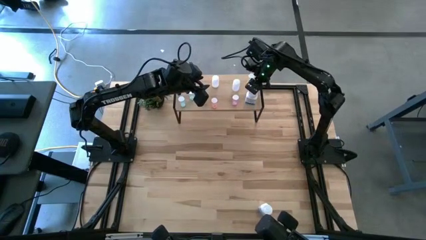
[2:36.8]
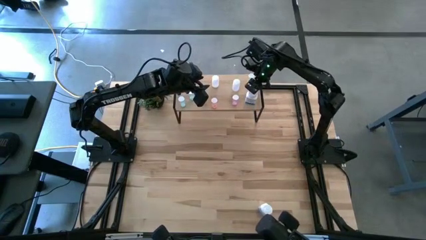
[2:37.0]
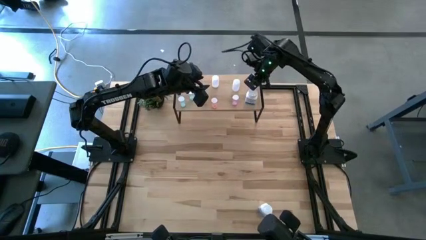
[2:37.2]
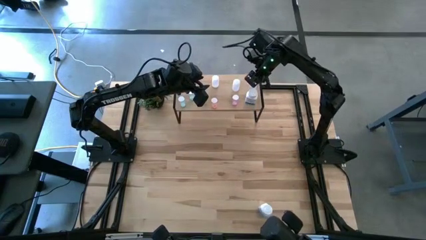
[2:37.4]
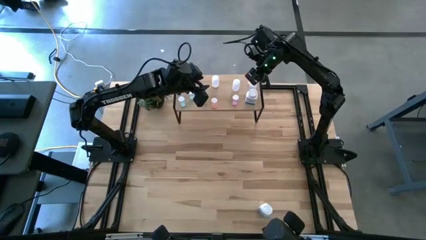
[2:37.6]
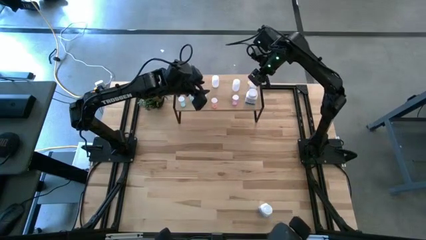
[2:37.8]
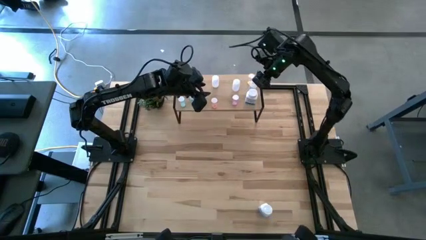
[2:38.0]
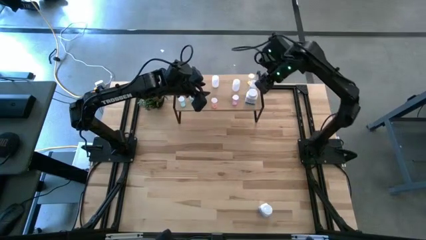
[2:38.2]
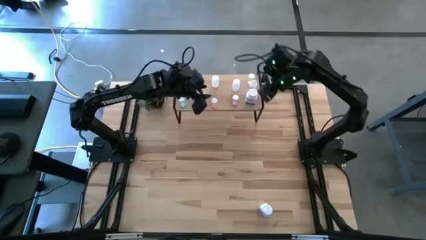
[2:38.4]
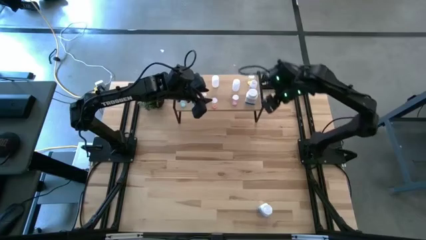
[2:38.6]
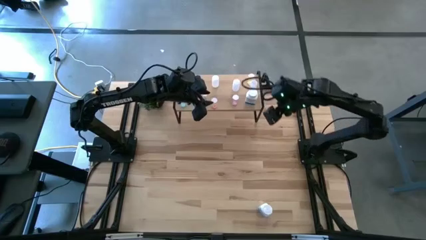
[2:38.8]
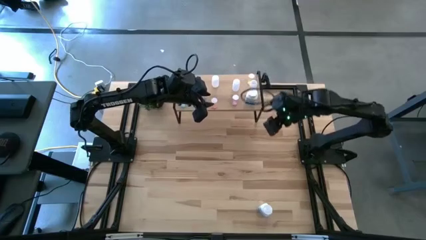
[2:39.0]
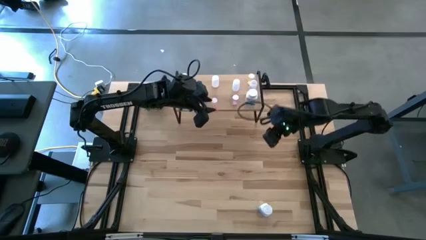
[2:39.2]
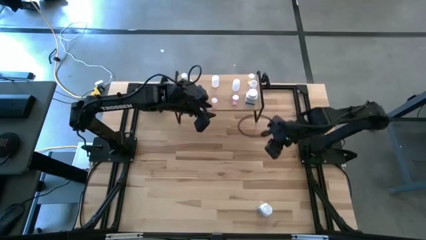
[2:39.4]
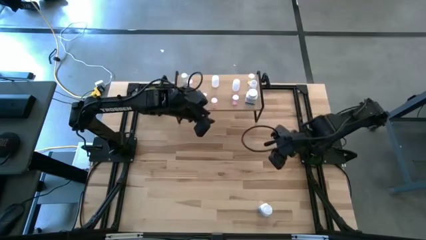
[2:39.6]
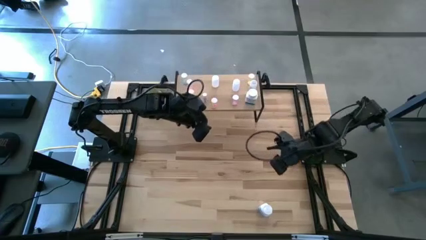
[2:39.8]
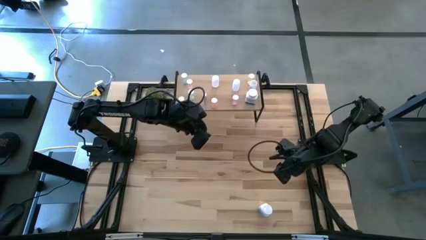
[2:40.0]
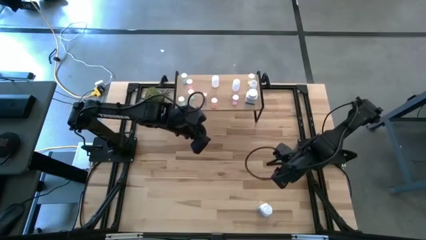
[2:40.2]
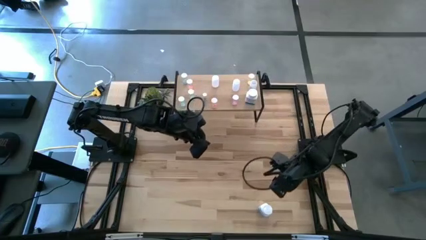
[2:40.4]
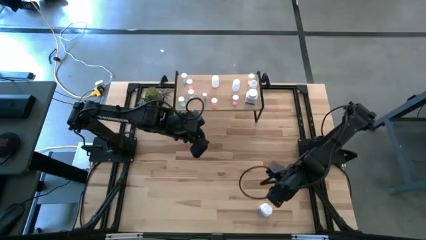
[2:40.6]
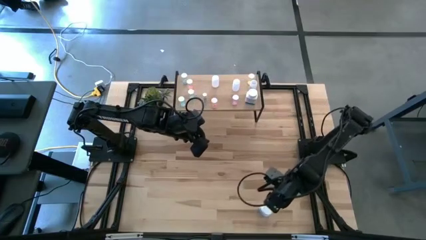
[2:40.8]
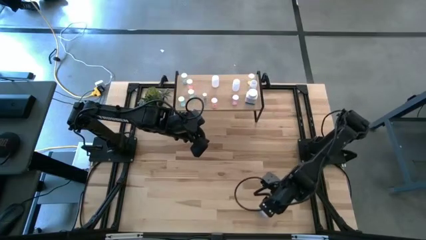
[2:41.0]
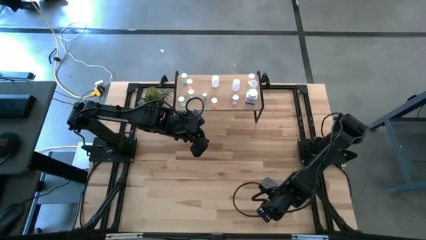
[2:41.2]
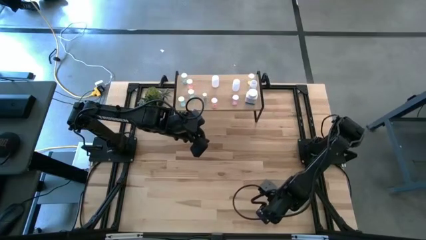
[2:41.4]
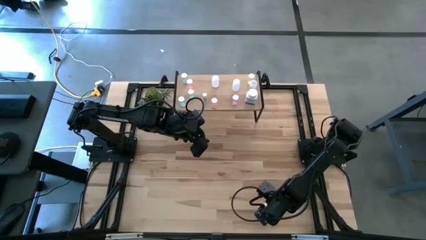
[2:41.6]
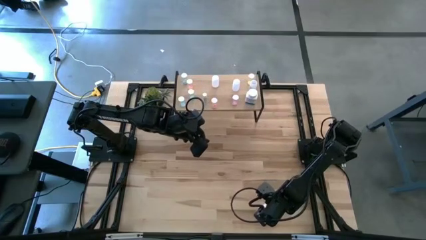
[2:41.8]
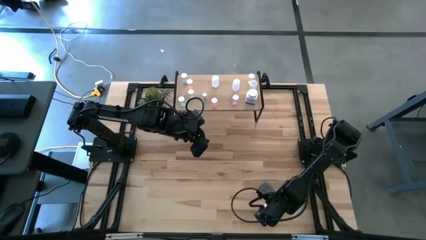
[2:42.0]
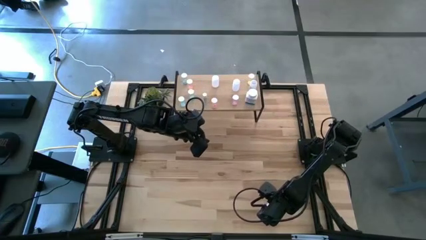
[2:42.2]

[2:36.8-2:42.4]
Task: Pick and place medicine bottles onto shelf by color
Put the white blue pill bottle on the shelf

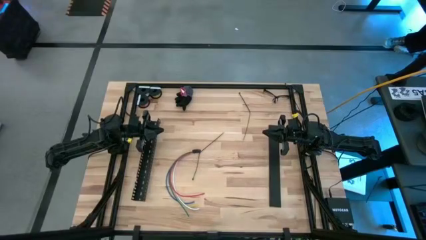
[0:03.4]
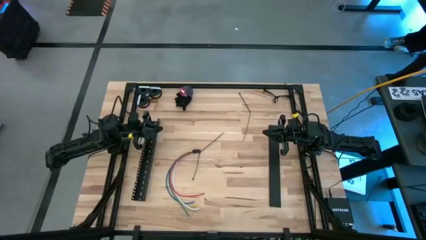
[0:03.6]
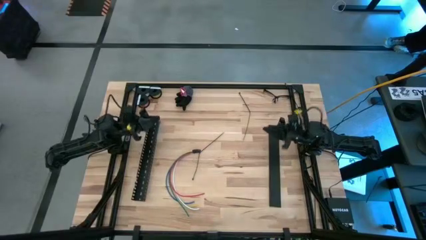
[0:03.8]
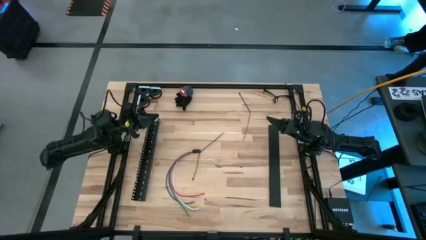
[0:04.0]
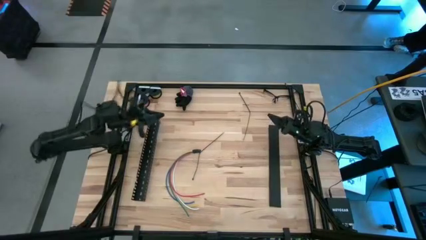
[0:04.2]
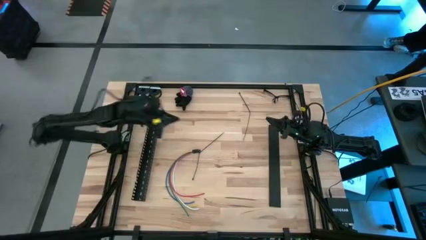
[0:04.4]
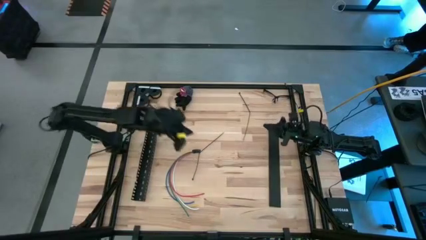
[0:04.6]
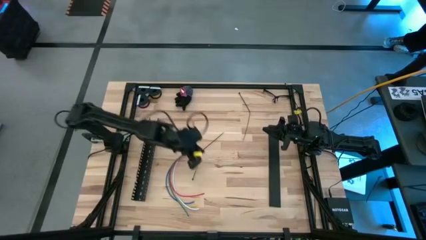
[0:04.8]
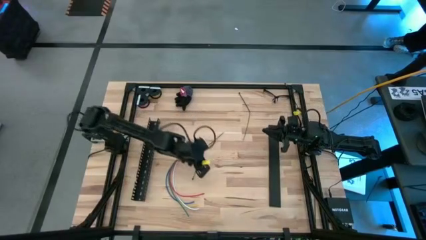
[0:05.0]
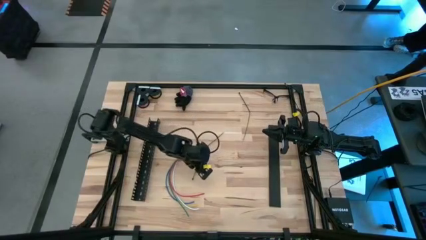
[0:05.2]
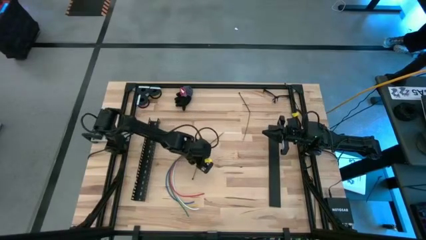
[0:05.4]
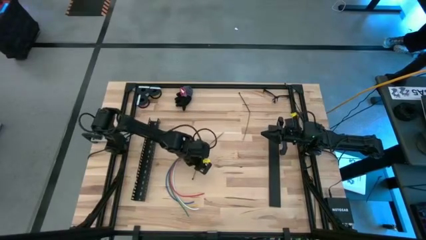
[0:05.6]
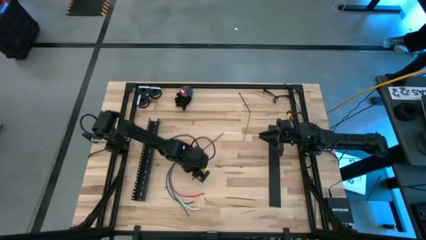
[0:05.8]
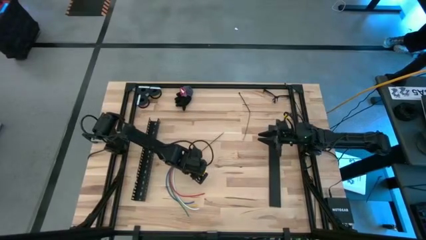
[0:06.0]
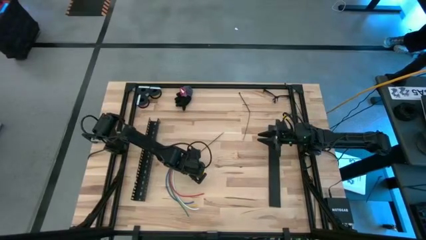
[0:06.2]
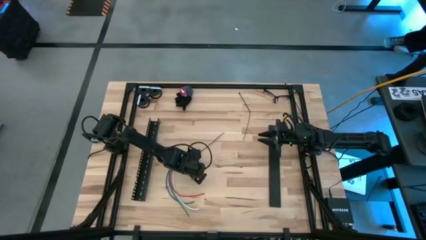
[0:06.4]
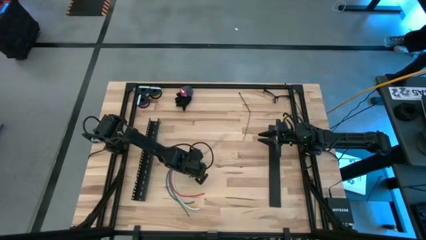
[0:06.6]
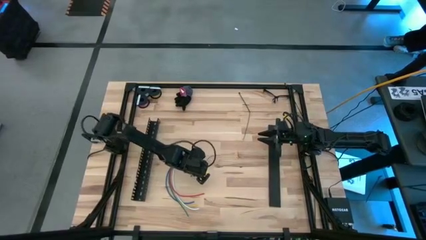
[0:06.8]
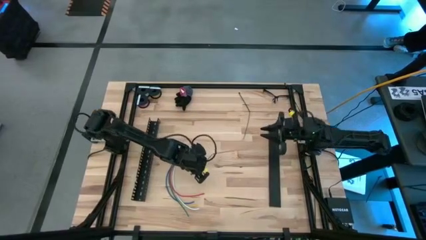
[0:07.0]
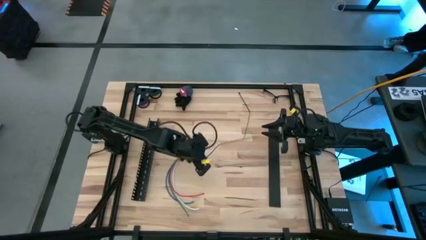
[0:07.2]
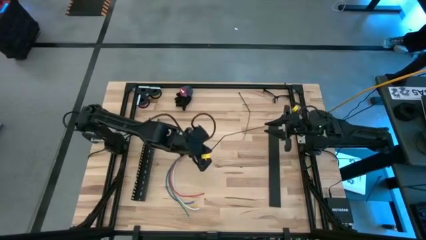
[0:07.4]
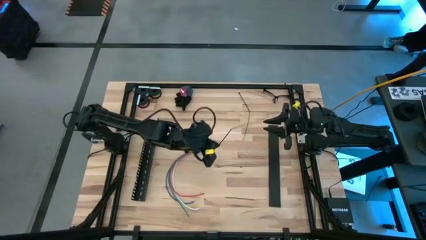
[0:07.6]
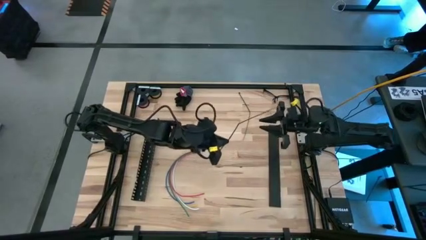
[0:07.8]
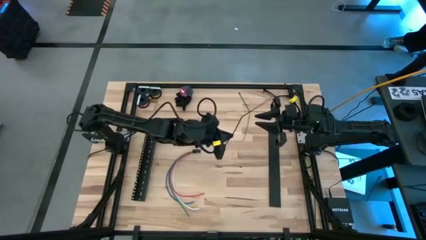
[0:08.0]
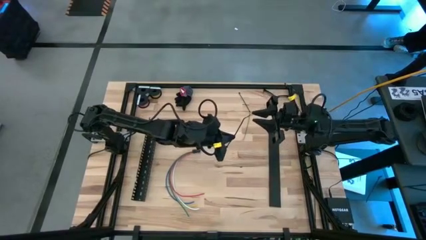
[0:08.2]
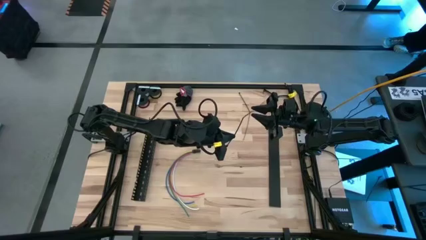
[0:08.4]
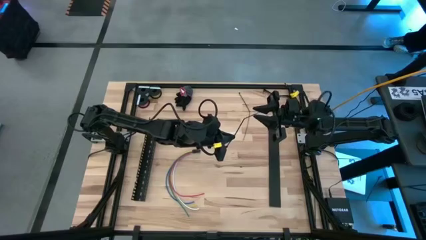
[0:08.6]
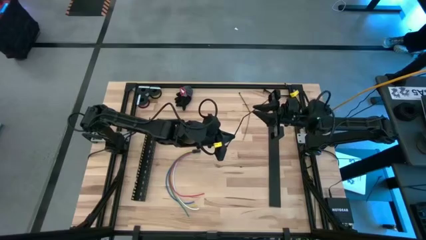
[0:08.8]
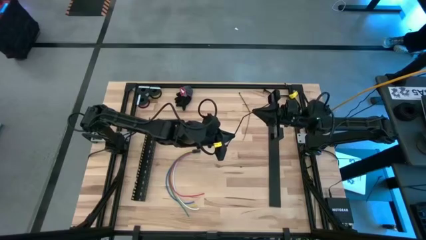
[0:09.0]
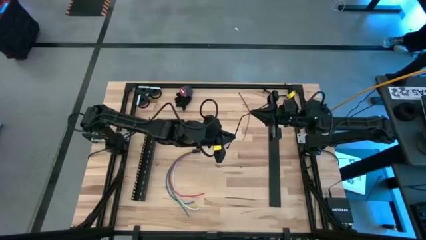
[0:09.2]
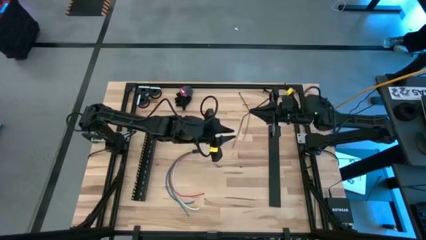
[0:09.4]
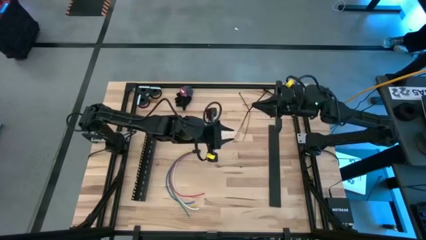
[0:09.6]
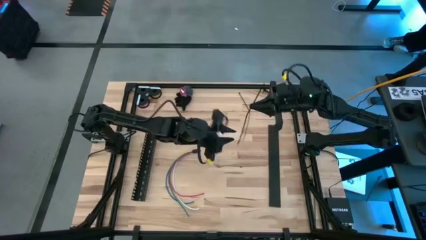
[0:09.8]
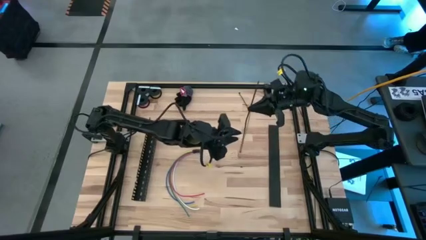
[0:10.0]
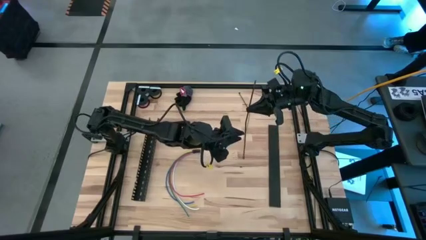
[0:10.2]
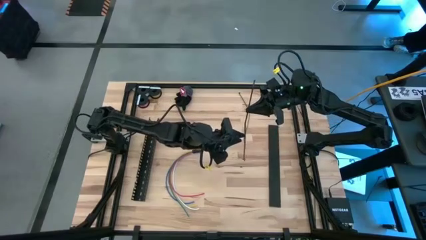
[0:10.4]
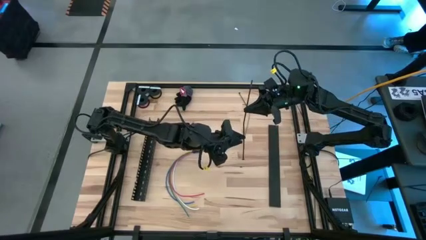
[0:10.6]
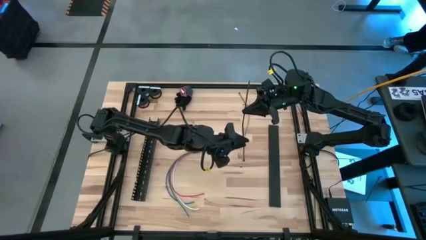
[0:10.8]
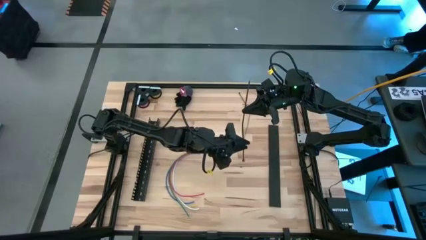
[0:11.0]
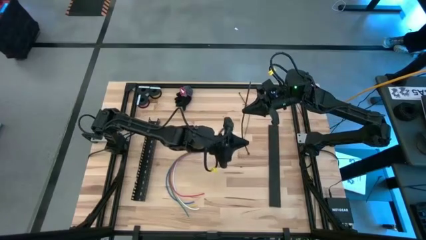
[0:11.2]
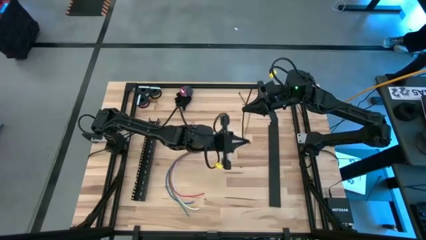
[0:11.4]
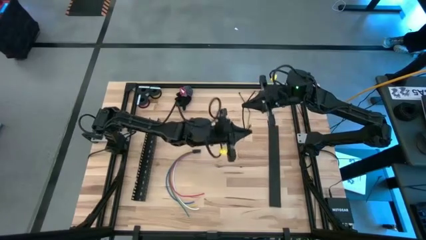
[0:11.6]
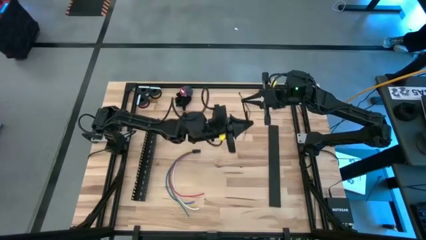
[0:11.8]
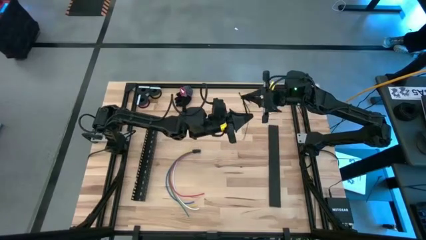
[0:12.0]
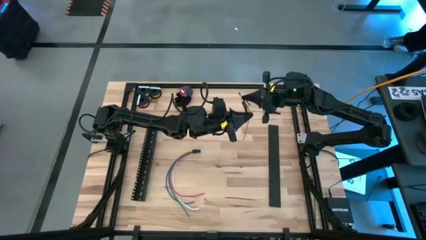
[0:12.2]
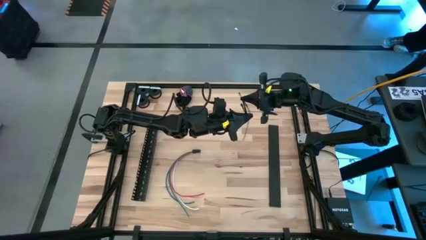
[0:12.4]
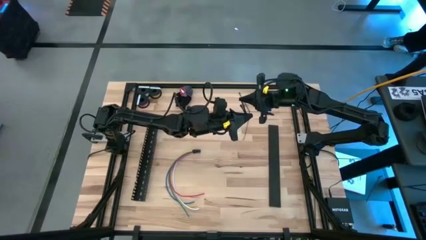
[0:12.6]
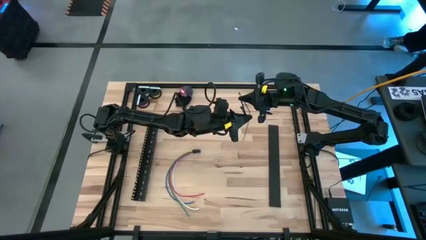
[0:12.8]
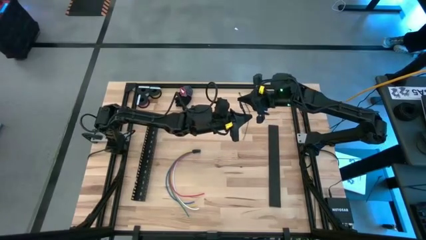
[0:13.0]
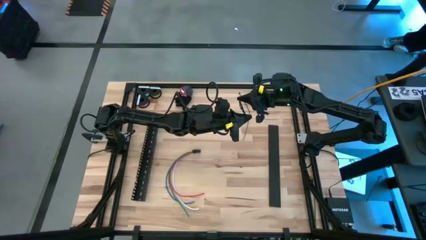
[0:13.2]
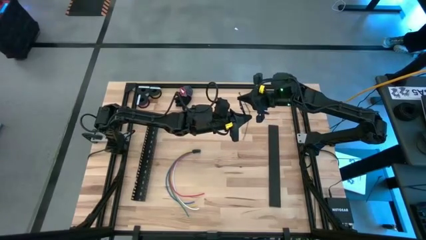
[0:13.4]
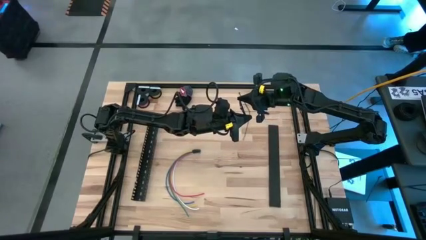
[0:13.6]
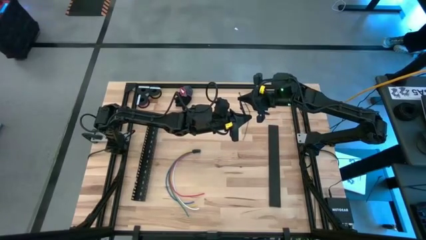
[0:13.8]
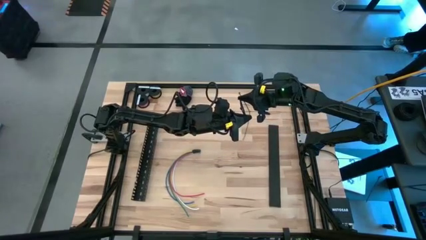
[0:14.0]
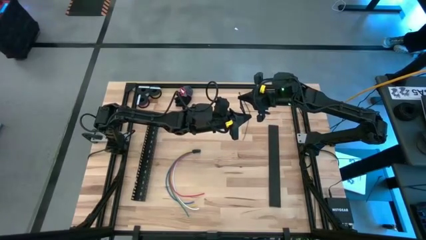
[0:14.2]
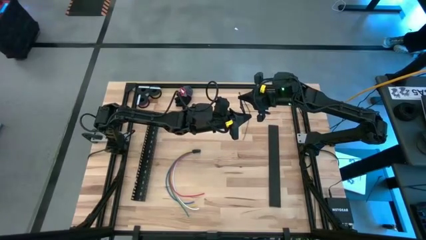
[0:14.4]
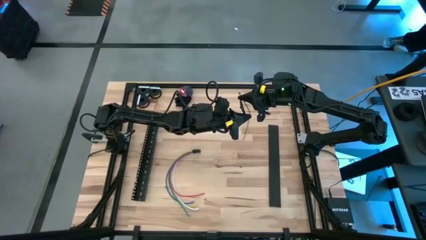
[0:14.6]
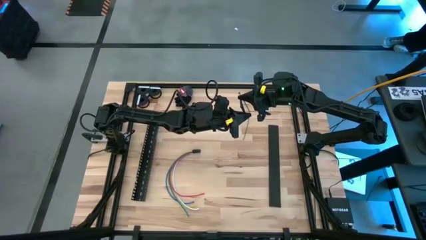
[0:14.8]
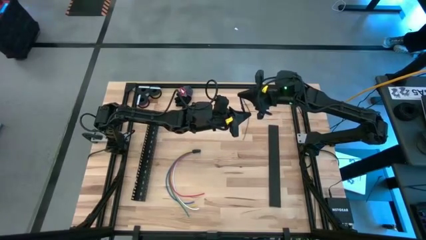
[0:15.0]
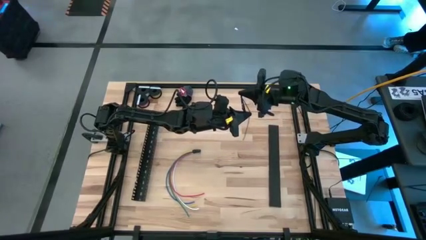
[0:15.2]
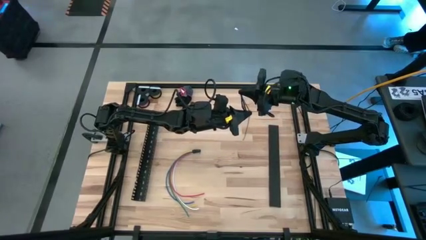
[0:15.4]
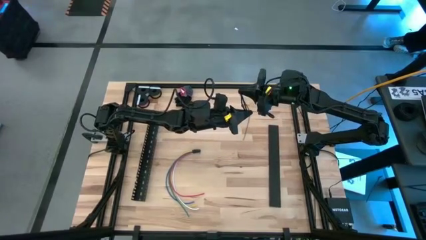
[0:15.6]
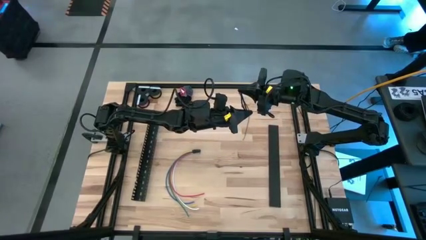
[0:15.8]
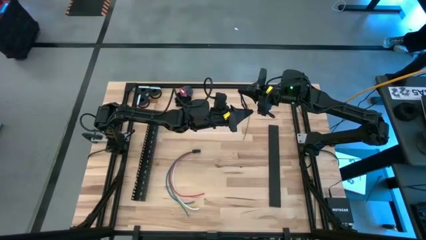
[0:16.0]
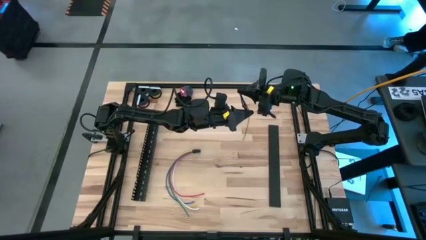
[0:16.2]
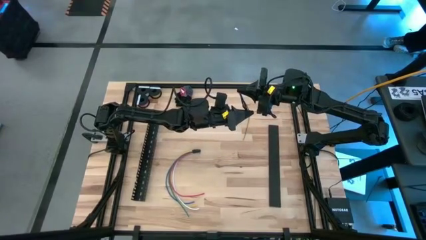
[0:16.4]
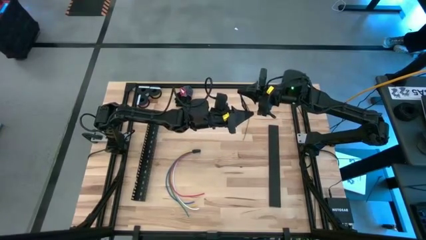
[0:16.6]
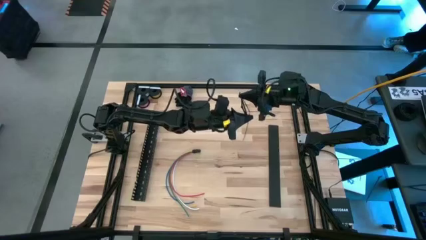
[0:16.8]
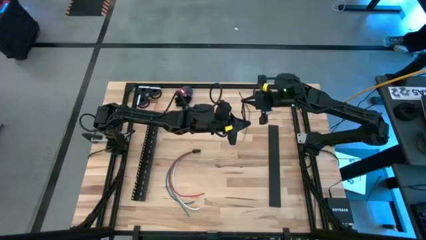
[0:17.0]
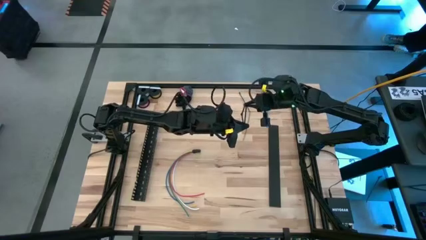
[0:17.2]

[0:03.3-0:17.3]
Task: Ziptie cables
Wrap the cable wires with the black zip tie
